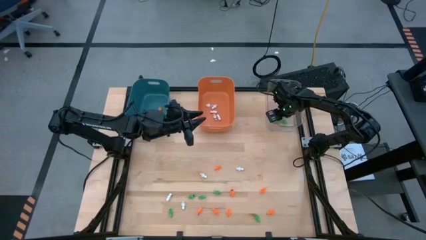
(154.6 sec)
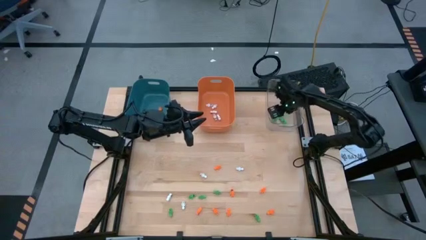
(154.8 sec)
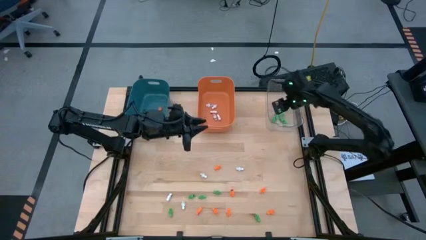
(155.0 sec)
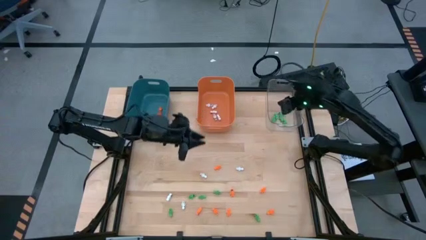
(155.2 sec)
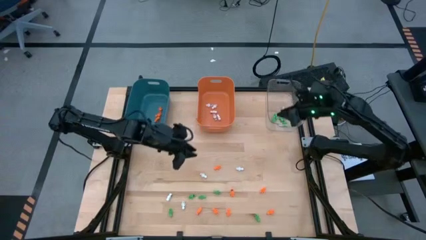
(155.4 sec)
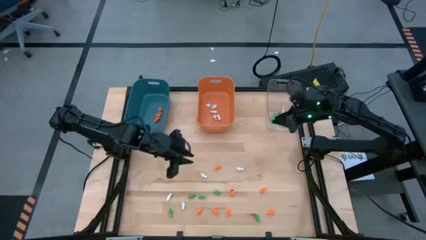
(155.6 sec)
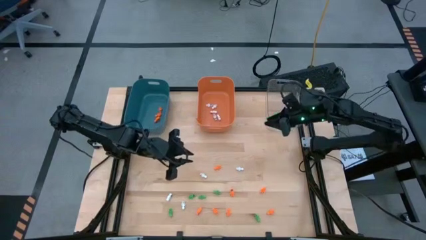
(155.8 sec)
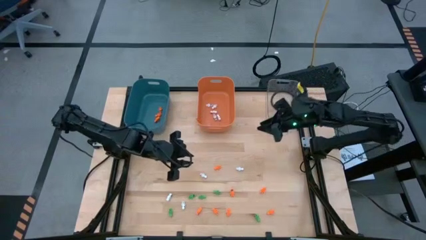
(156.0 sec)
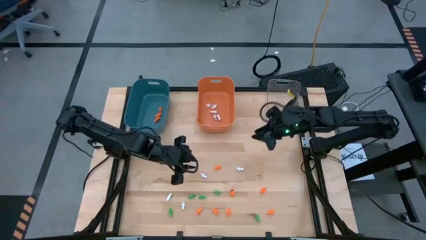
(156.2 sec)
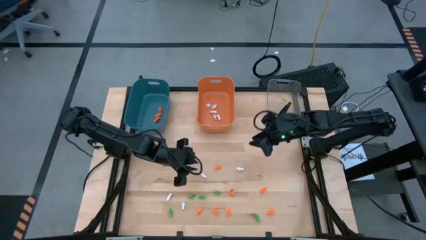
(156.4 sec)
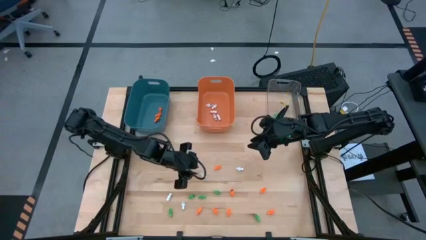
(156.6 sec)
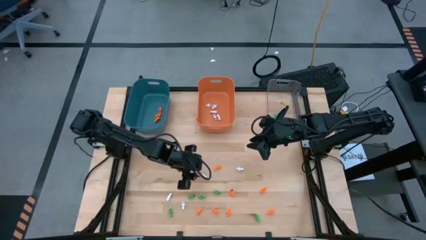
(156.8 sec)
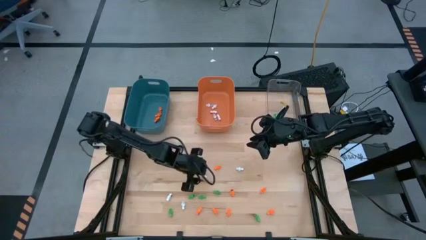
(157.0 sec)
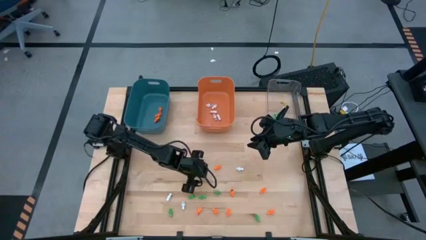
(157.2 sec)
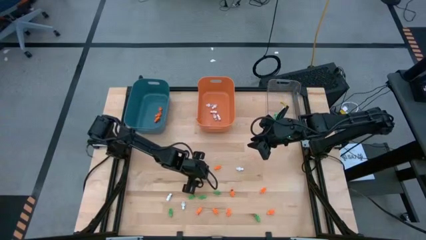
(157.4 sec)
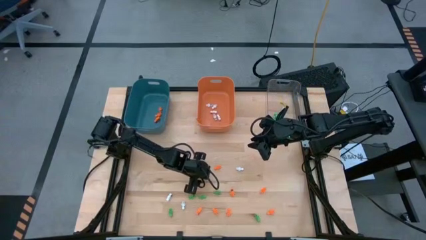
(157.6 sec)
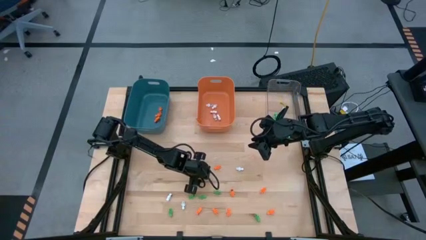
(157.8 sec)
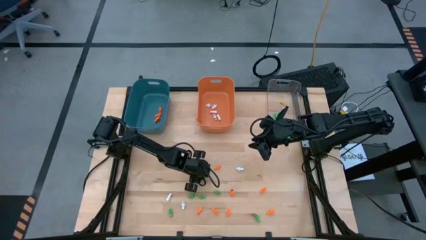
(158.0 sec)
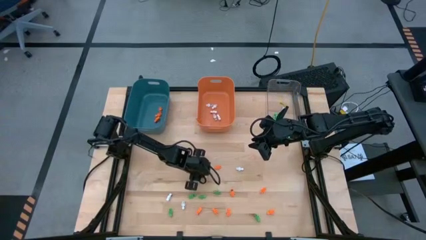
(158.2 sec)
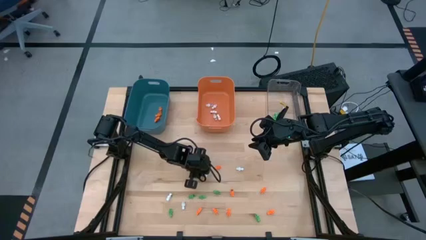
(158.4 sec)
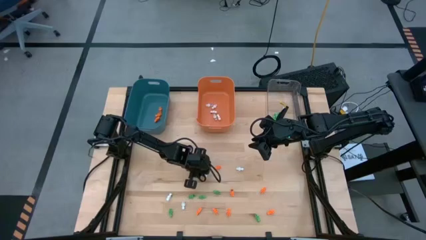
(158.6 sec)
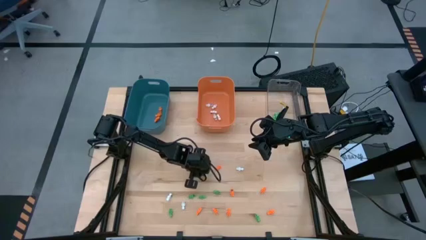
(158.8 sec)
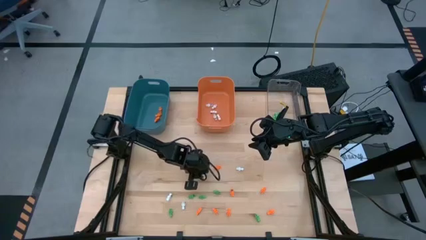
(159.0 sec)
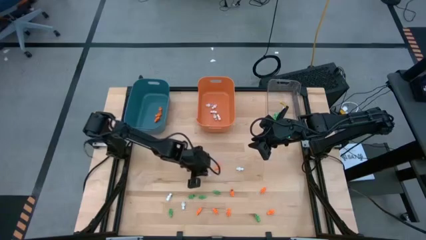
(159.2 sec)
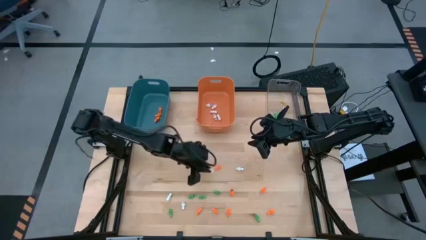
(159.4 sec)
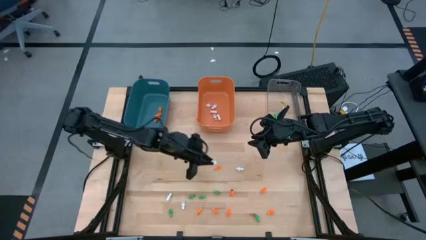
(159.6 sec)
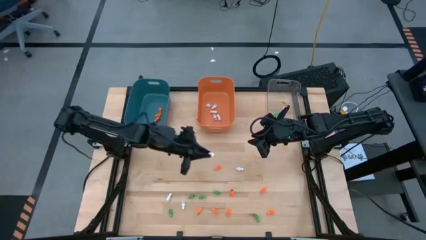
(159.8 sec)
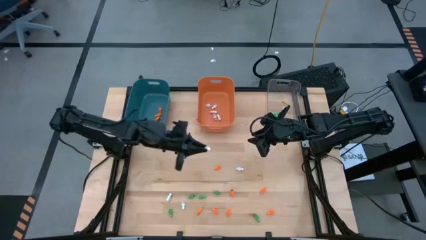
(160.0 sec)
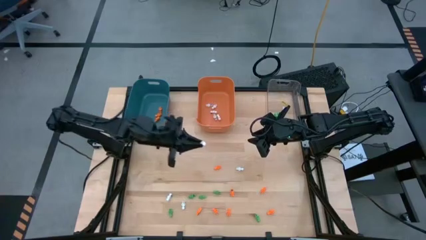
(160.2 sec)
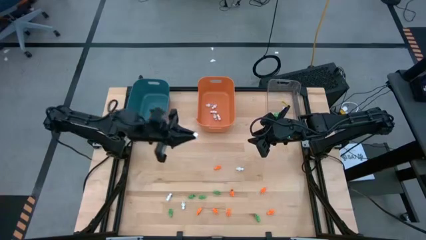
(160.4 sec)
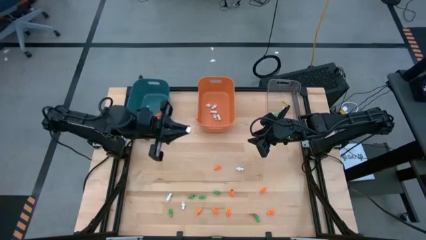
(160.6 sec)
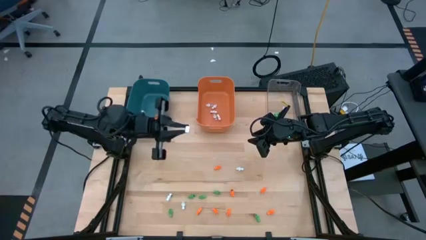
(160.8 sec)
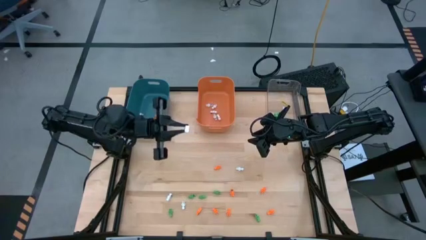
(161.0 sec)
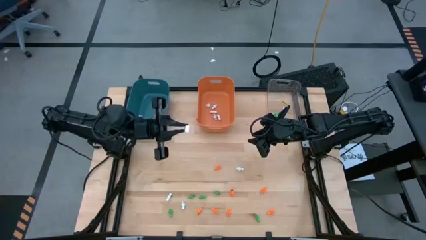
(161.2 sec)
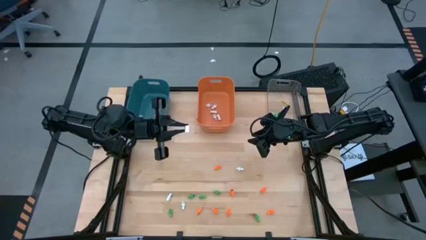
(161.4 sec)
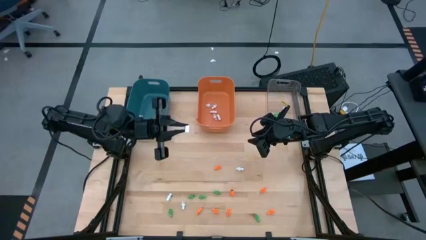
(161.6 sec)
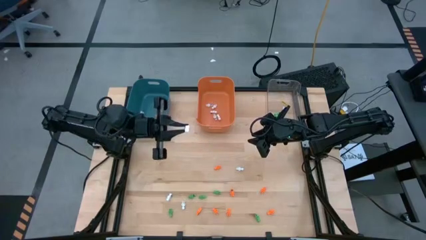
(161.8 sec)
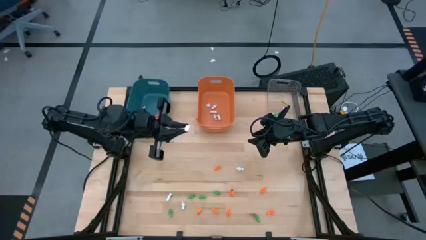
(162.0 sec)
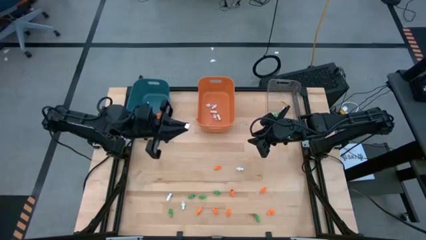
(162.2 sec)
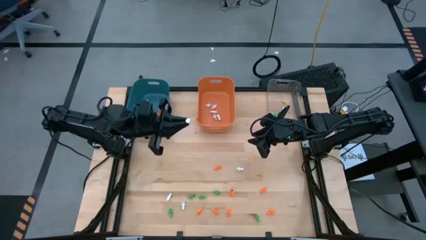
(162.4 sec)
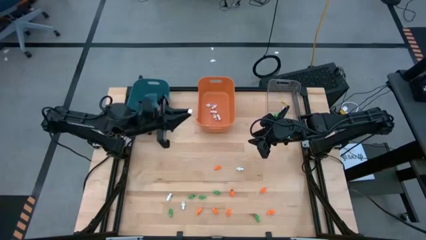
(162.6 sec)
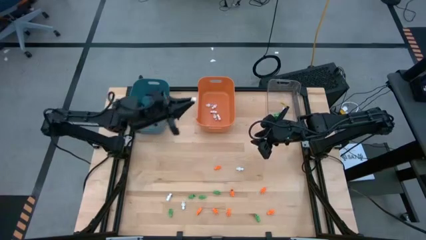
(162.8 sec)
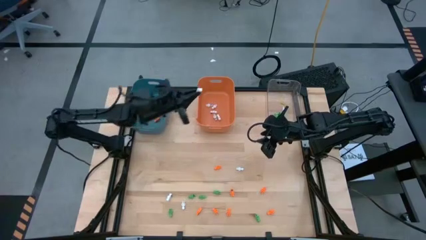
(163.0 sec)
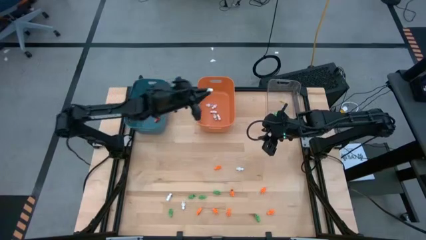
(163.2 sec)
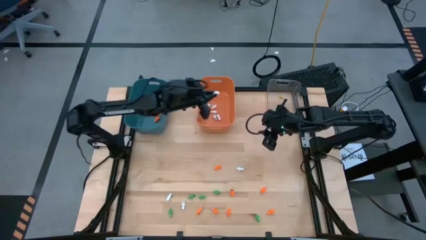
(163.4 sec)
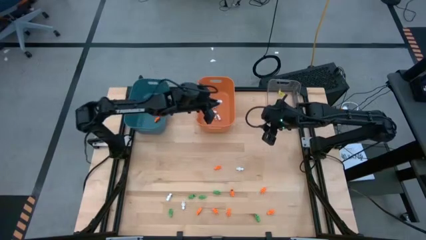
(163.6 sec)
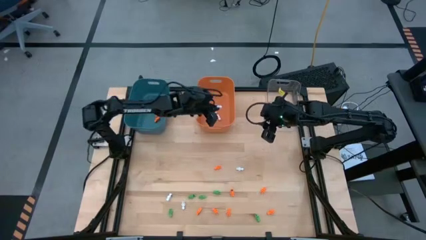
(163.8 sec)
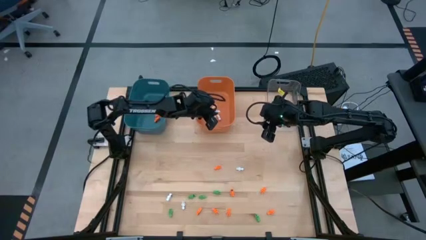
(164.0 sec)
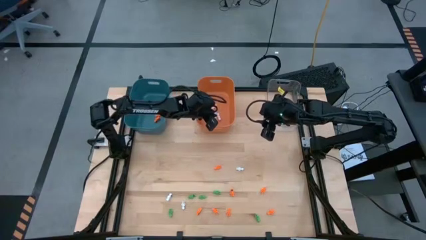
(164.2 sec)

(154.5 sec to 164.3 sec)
Task: Sort Halloween decoration
Put the white skeleton toy into the orange bin
